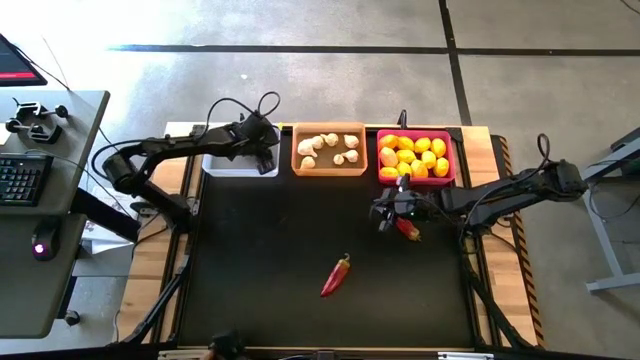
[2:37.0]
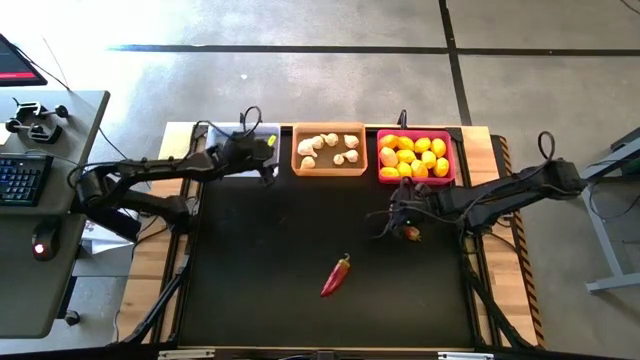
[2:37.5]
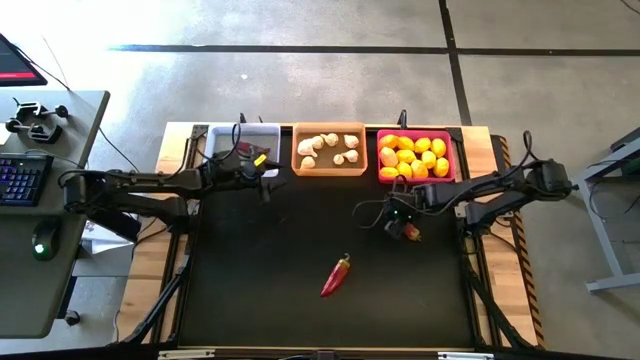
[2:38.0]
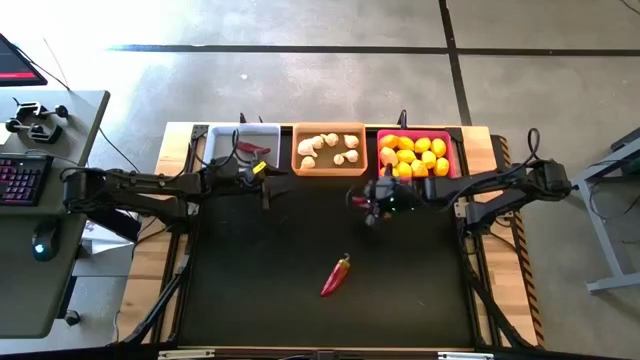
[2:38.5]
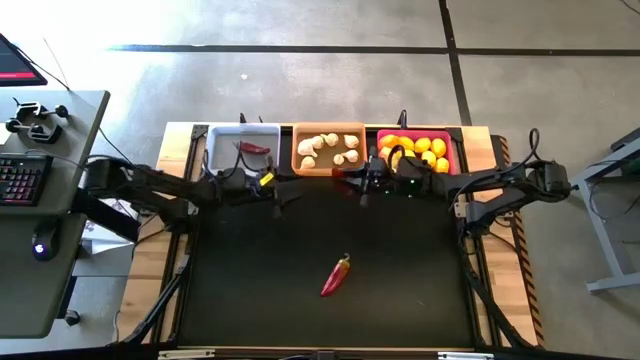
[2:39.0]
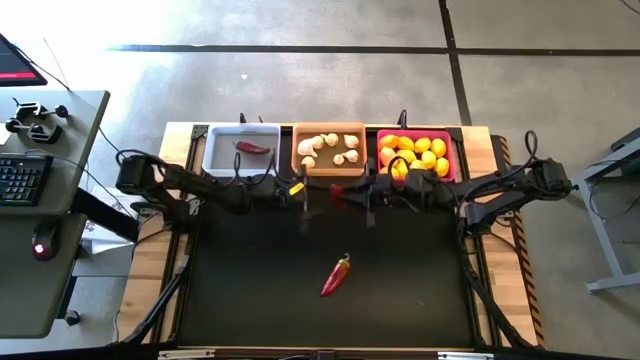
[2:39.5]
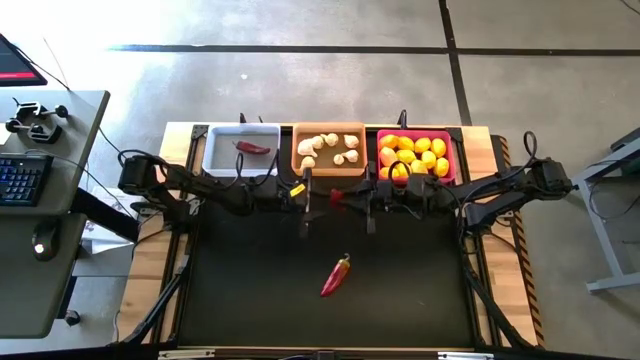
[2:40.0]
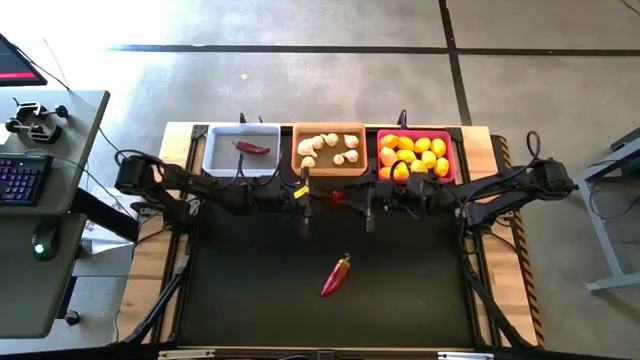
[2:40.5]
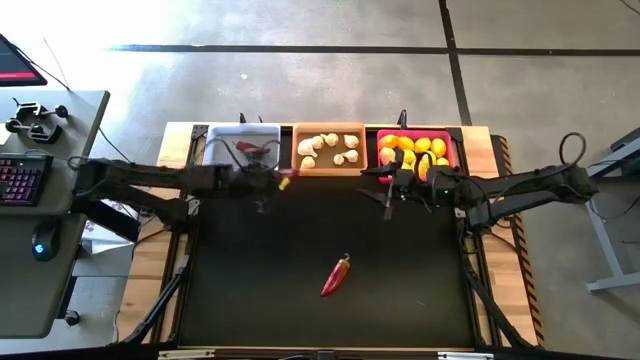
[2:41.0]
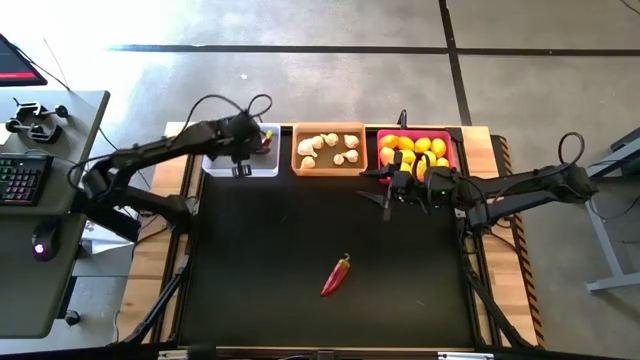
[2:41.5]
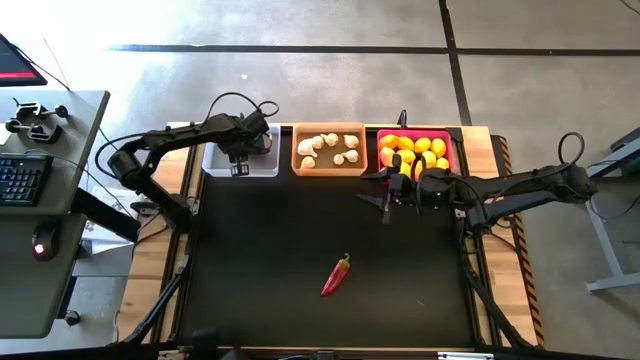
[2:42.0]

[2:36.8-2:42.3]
Task: Sort produce into baskets
Put the red chili pepper into the transparent bin

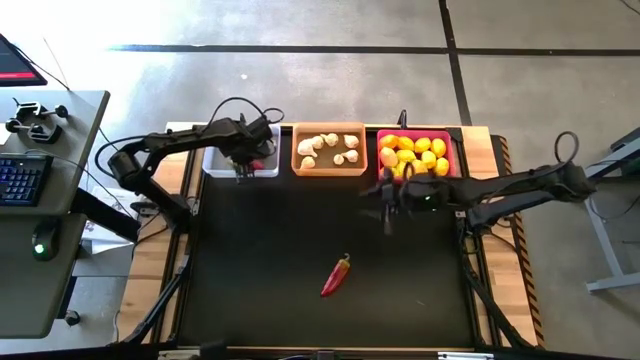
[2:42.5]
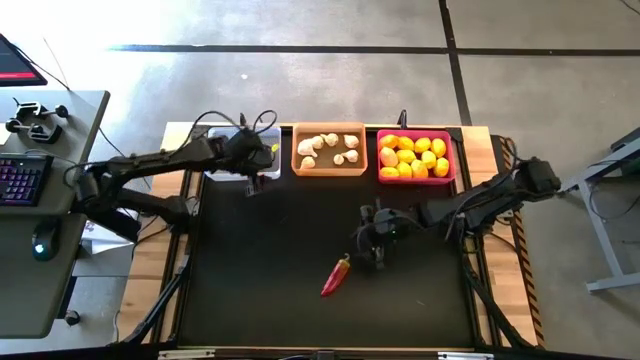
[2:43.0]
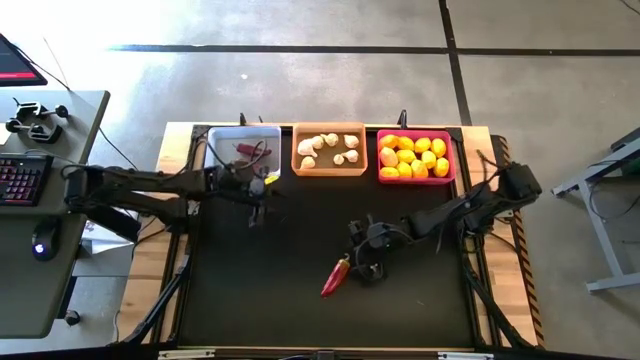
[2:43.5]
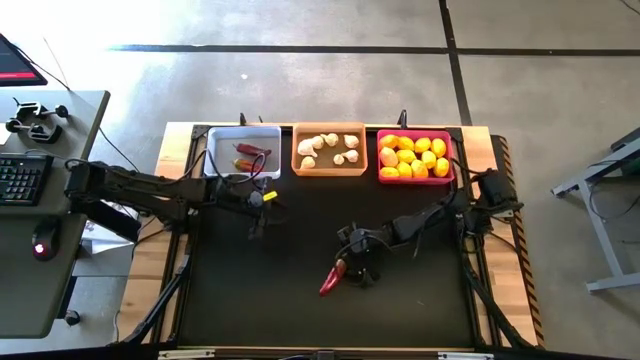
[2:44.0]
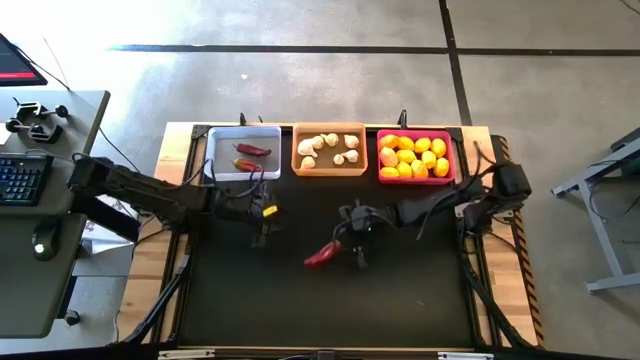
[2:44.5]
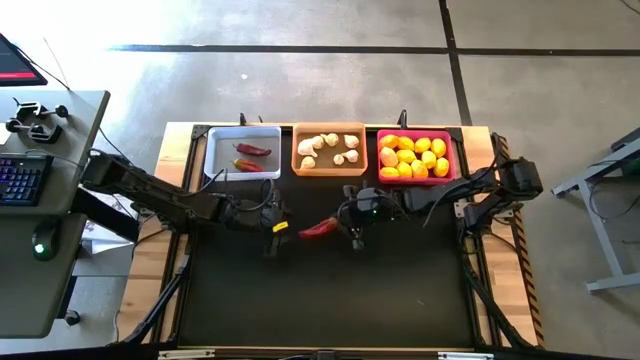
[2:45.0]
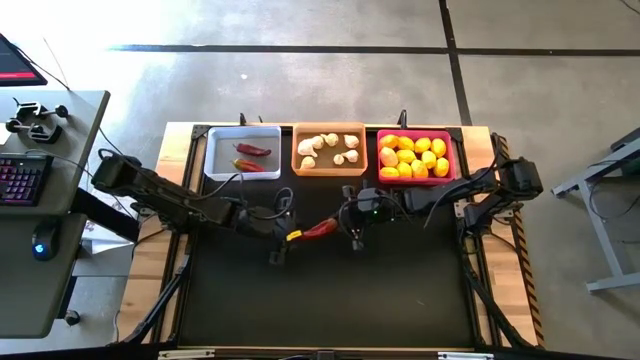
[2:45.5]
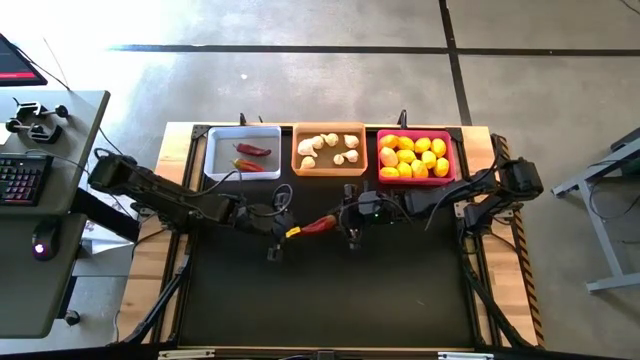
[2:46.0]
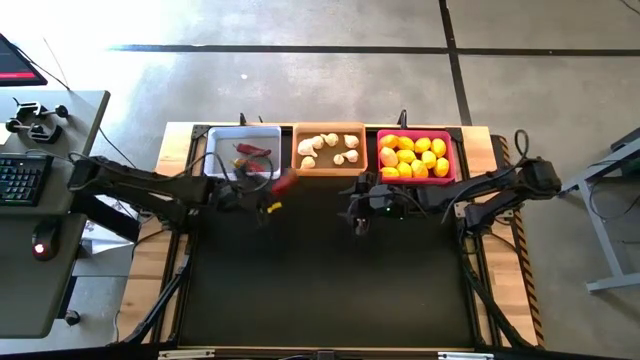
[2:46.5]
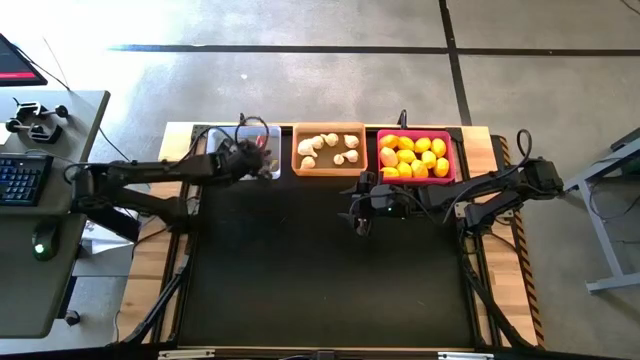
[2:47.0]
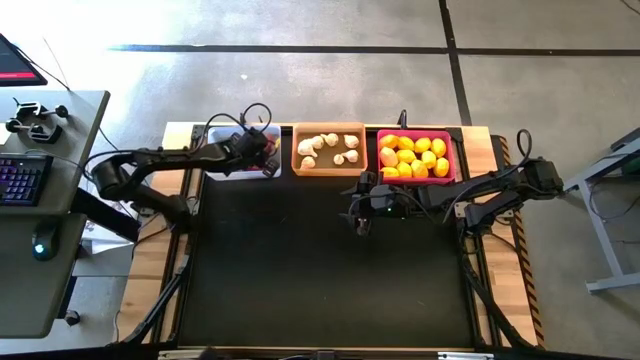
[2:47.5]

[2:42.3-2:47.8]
Put the red chili pepper into the transparent bin

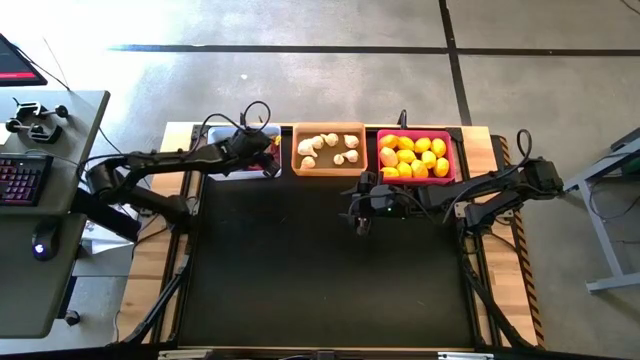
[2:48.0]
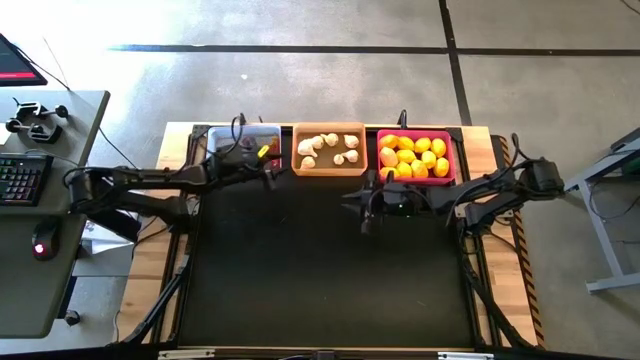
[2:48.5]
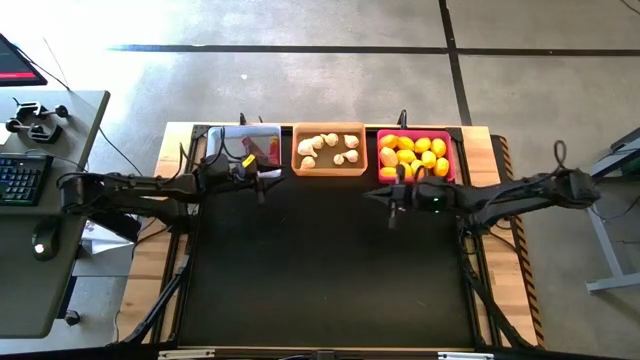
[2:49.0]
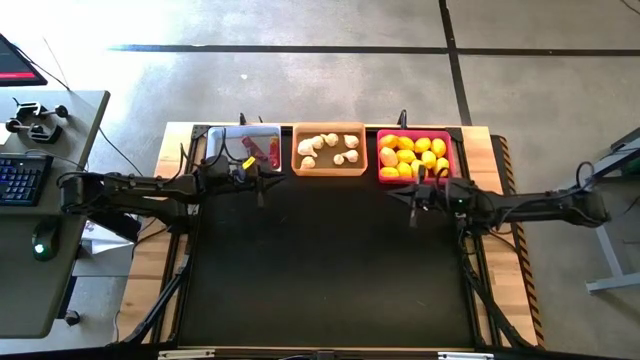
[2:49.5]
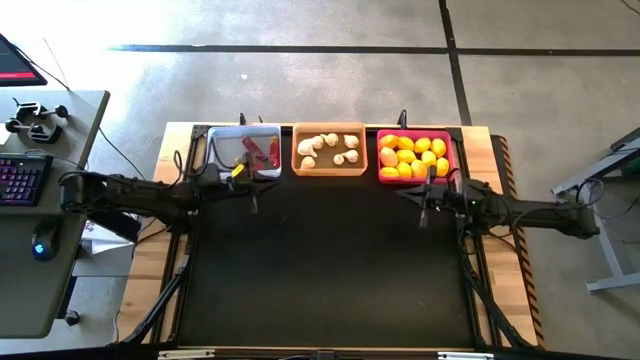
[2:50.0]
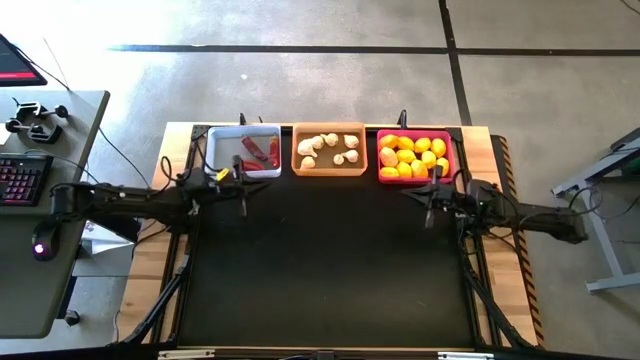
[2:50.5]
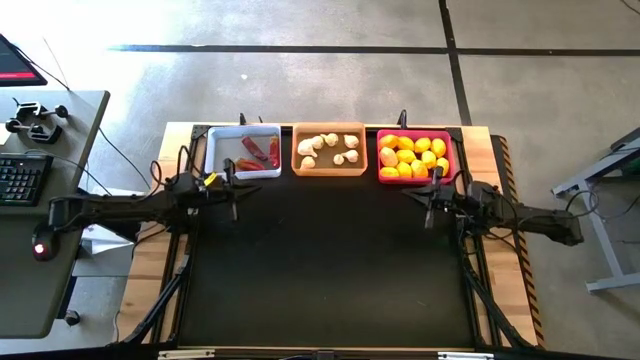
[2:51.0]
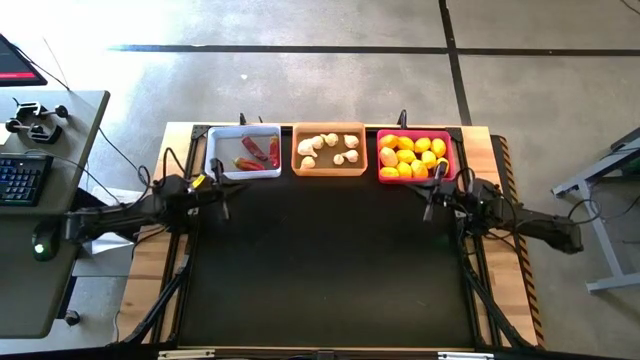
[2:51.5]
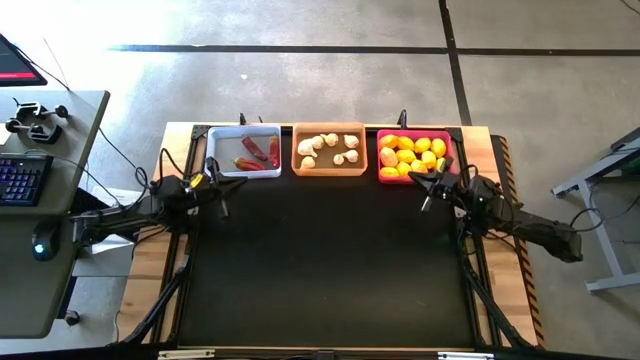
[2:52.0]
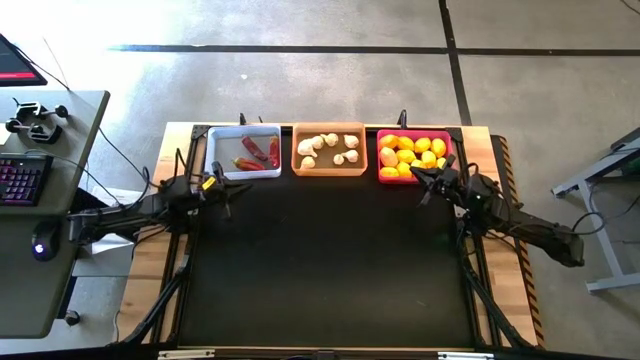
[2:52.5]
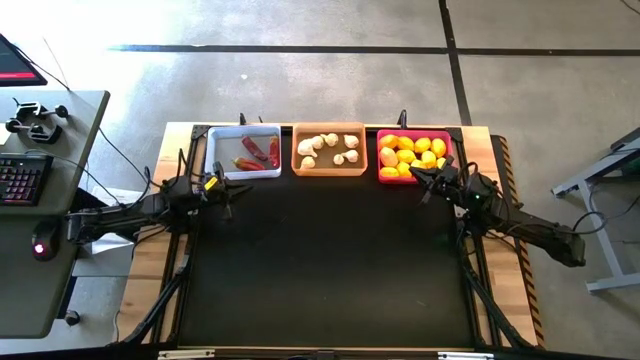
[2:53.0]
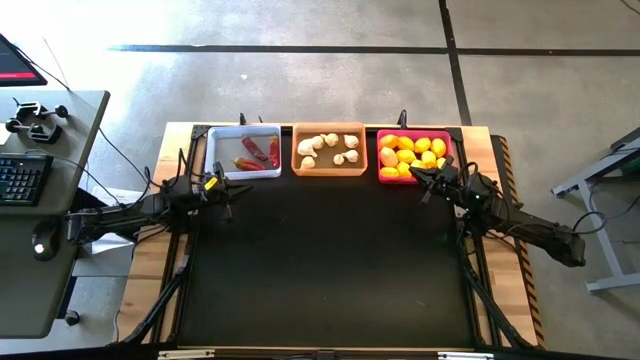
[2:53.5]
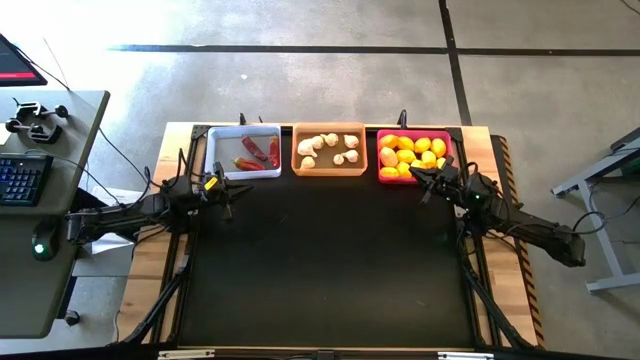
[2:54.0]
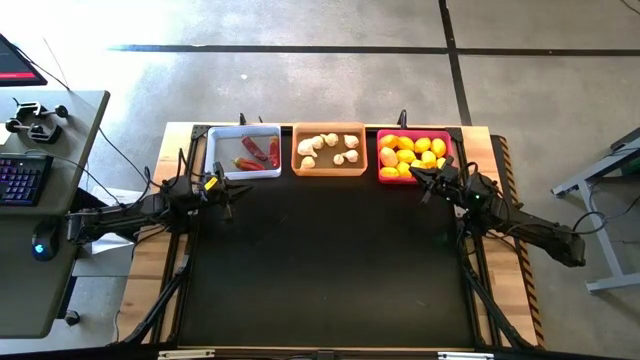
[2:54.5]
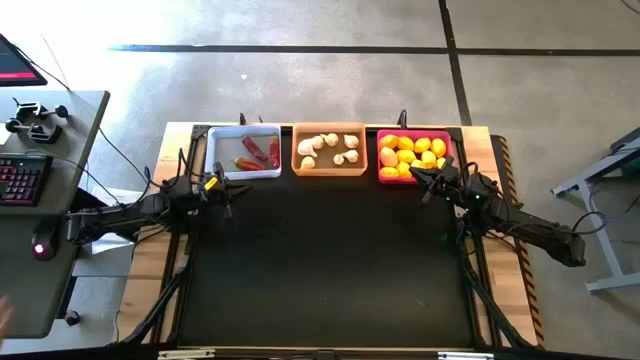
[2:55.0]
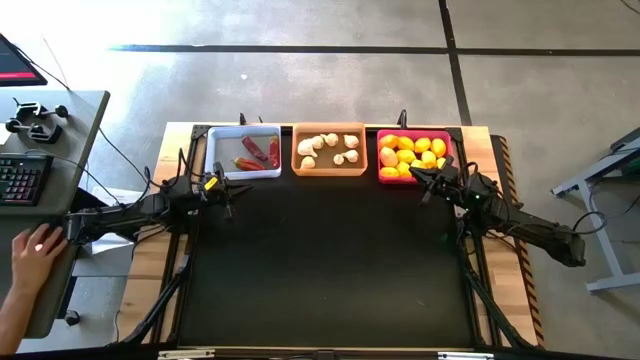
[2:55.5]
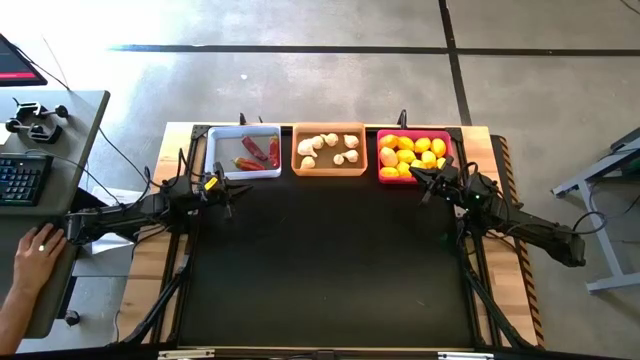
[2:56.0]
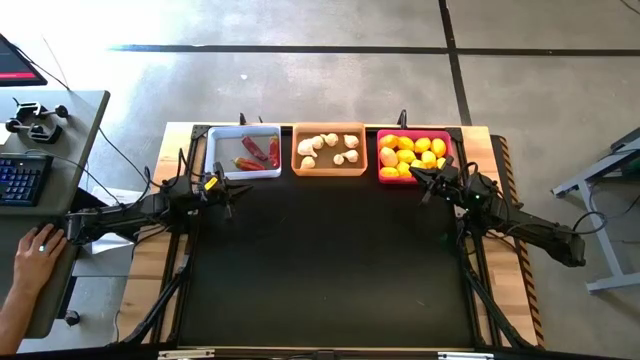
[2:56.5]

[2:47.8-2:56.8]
Return to Home Position

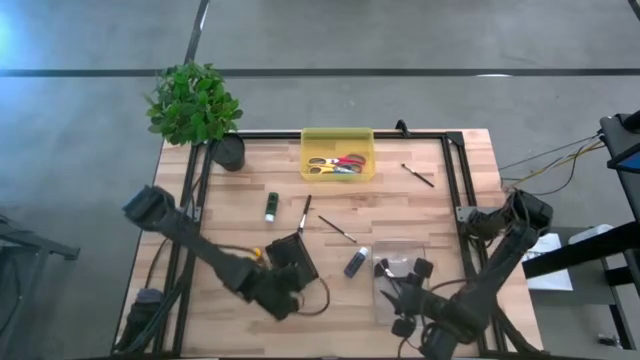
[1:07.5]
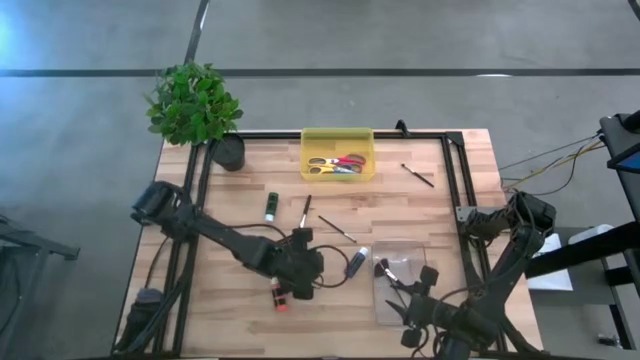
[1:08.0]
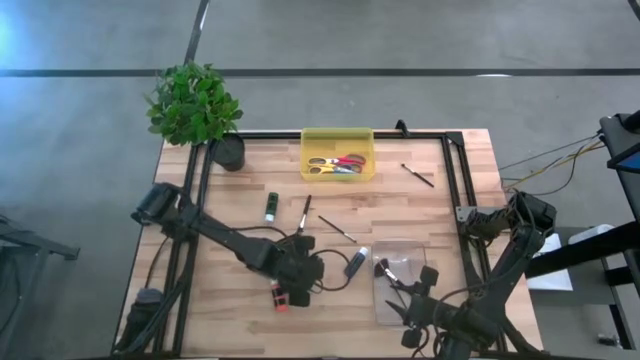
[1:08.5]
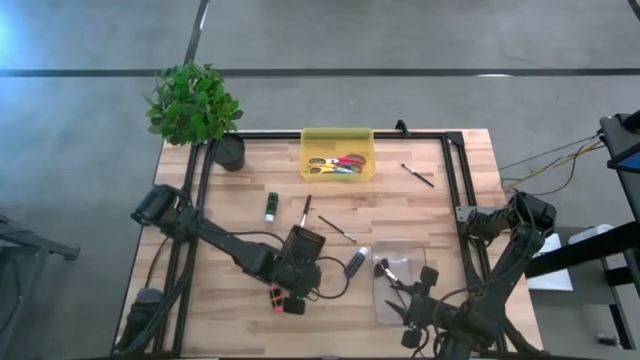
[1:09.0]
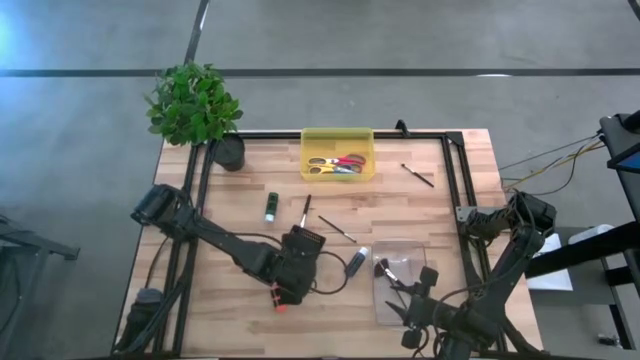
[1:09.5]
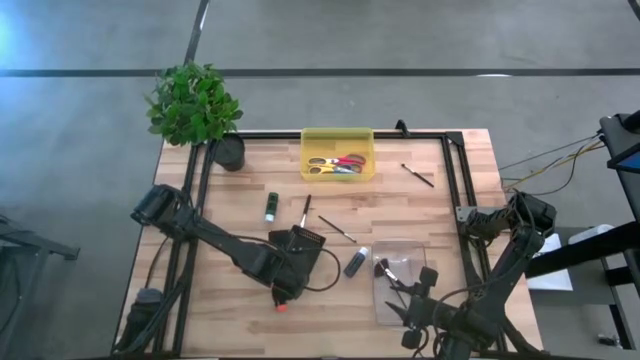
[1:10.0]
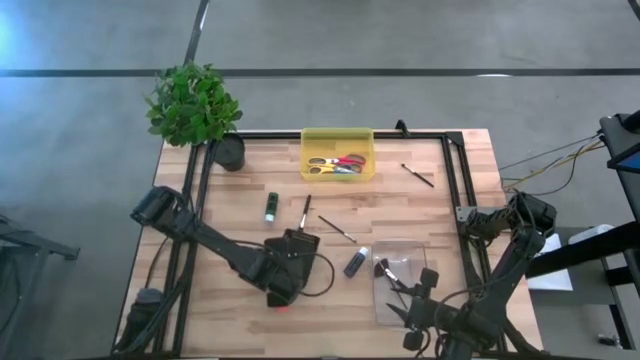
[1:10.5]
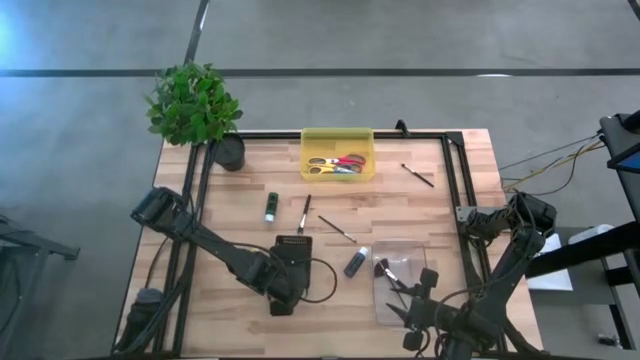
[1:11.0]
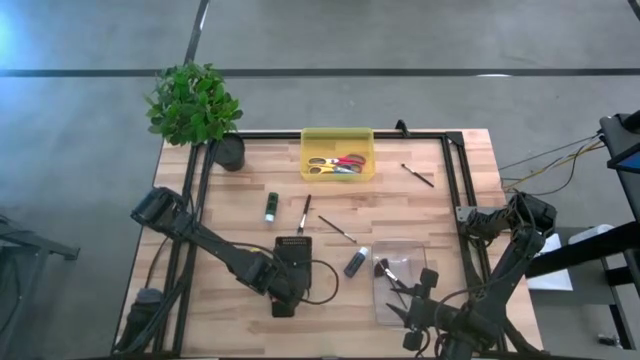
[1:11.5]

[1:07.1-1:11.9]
Task: Pick & Place Paint Supplies
Adjust the black bin
